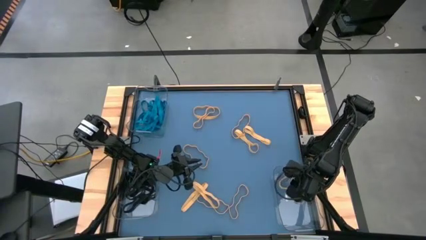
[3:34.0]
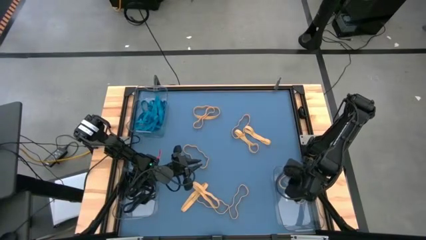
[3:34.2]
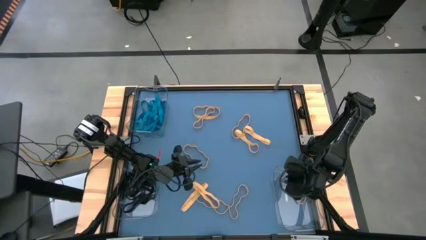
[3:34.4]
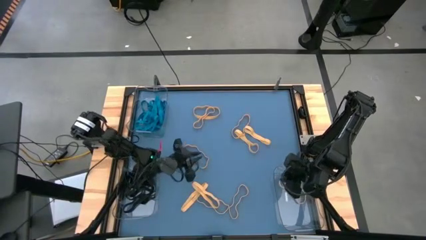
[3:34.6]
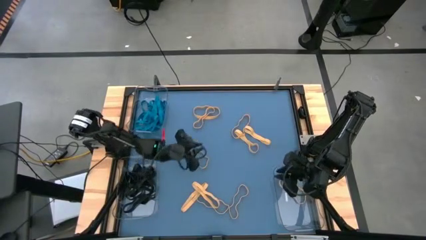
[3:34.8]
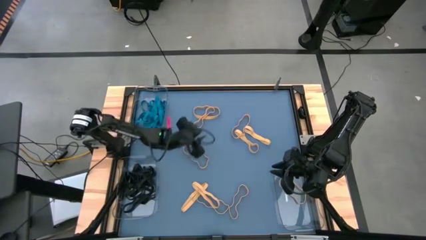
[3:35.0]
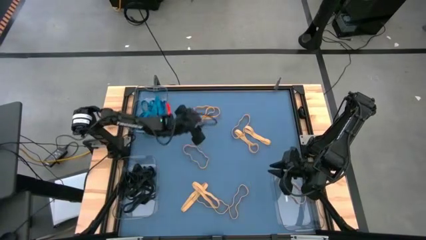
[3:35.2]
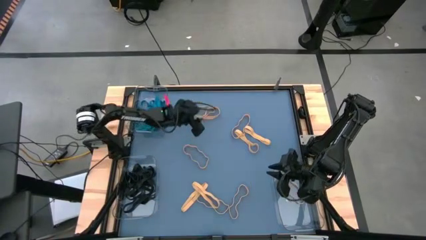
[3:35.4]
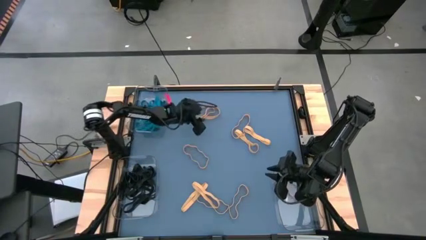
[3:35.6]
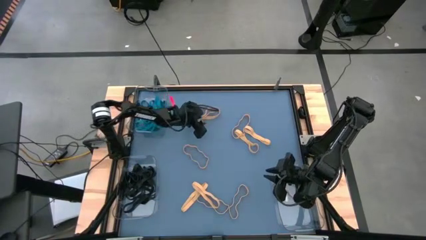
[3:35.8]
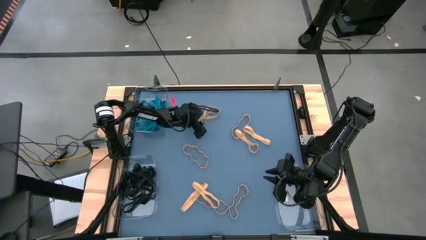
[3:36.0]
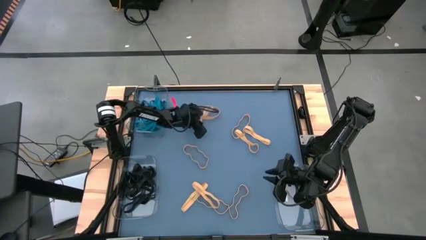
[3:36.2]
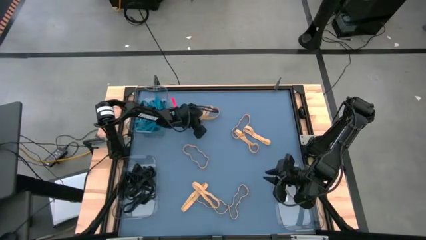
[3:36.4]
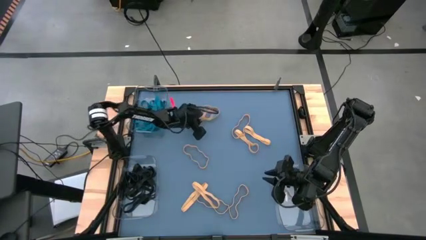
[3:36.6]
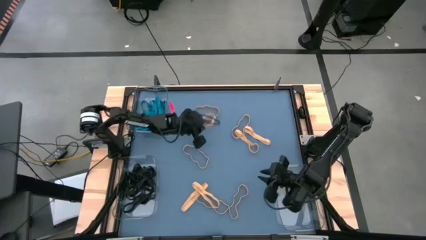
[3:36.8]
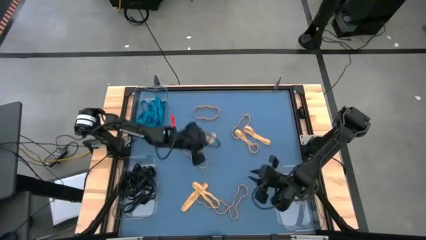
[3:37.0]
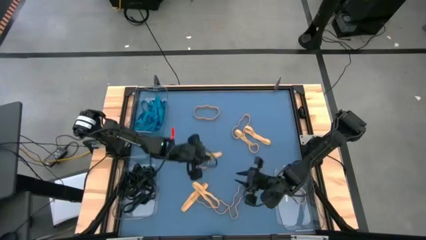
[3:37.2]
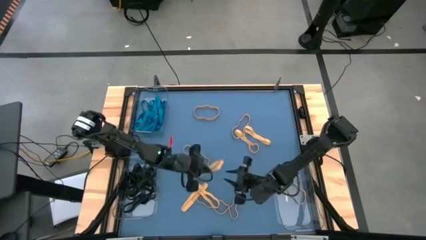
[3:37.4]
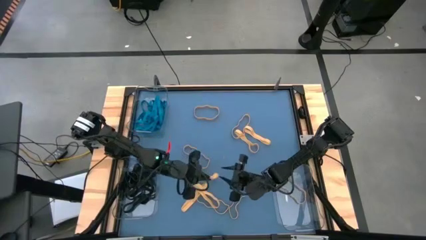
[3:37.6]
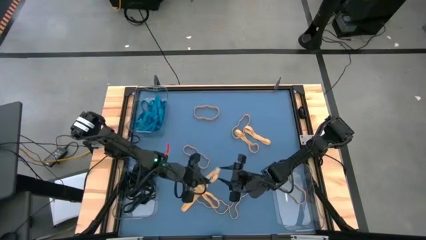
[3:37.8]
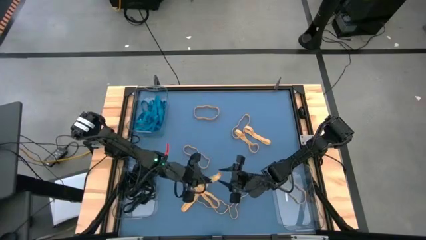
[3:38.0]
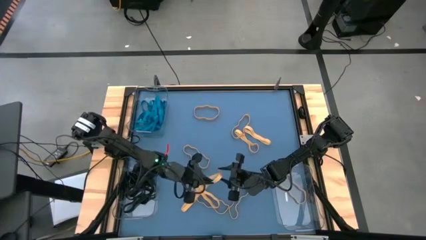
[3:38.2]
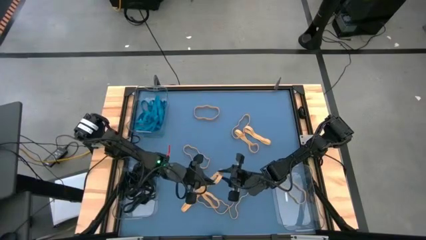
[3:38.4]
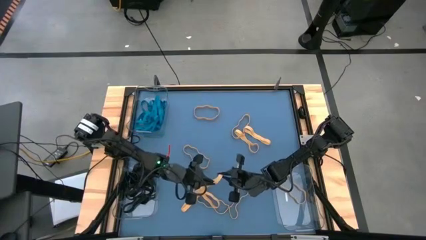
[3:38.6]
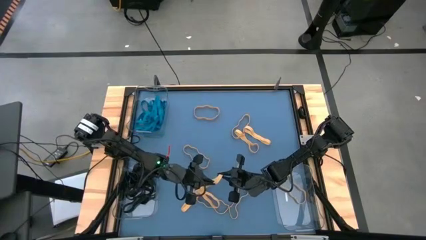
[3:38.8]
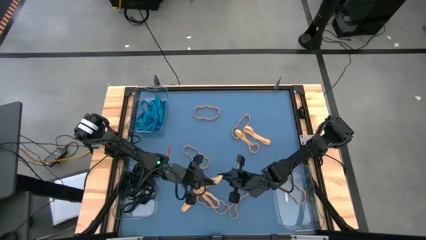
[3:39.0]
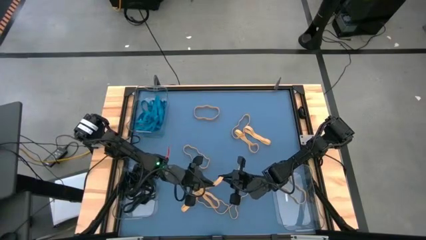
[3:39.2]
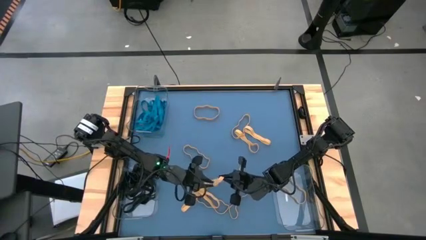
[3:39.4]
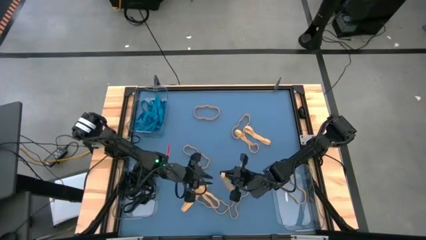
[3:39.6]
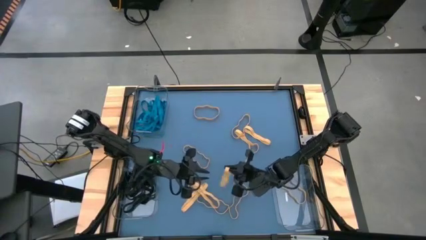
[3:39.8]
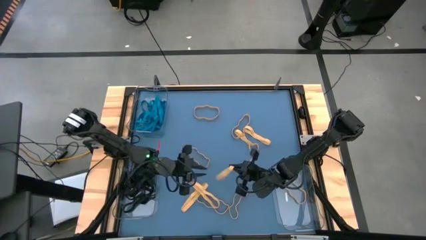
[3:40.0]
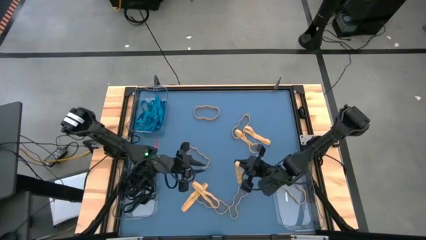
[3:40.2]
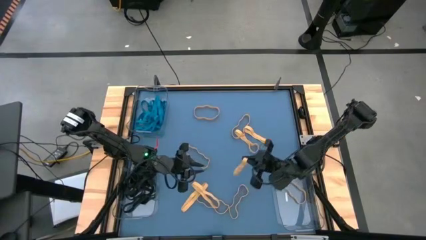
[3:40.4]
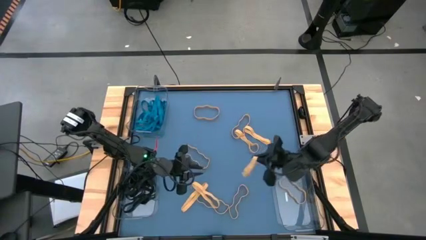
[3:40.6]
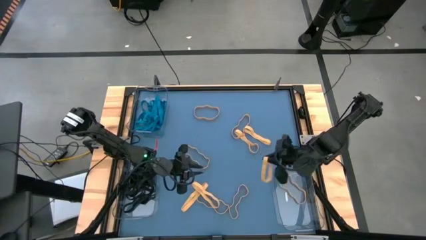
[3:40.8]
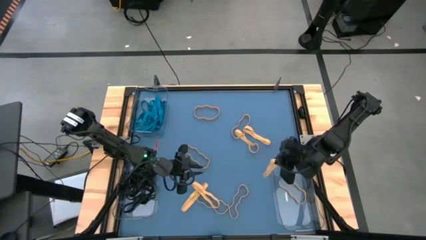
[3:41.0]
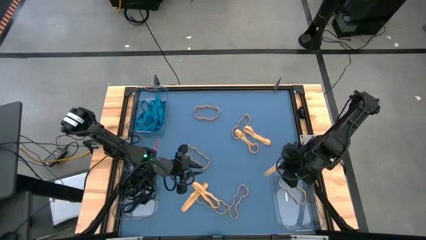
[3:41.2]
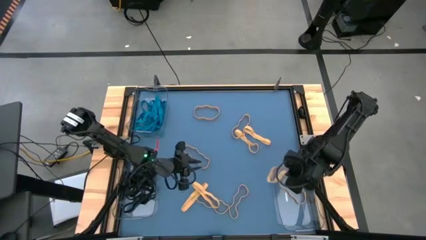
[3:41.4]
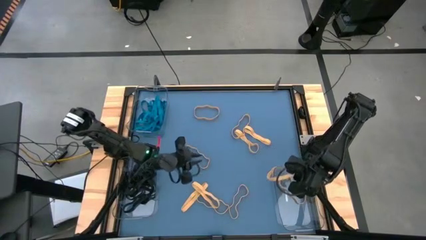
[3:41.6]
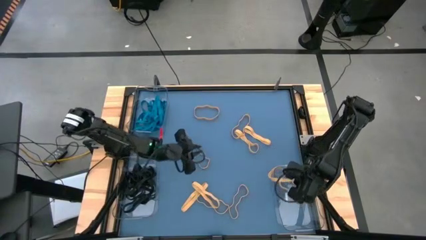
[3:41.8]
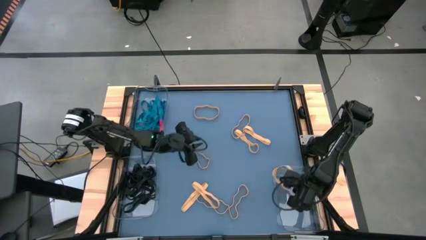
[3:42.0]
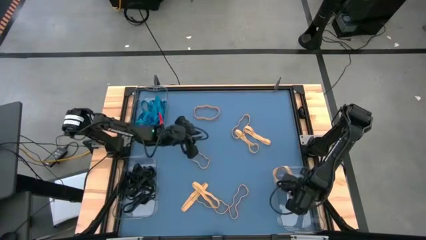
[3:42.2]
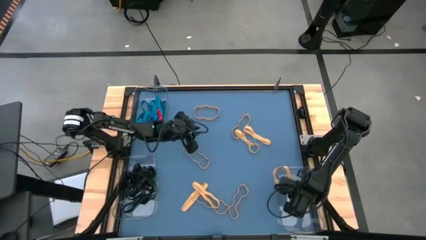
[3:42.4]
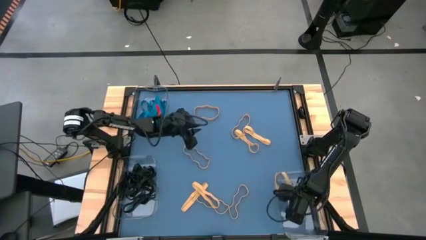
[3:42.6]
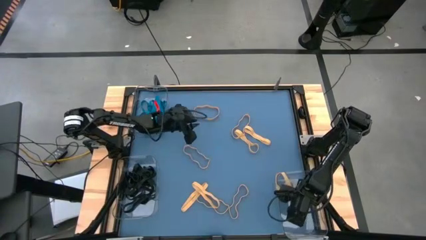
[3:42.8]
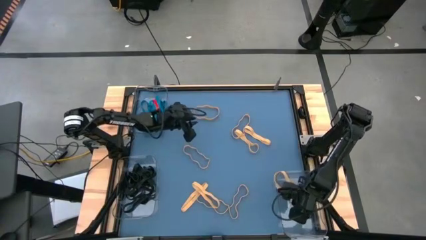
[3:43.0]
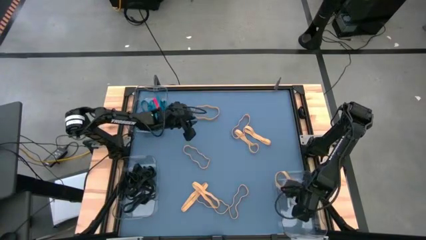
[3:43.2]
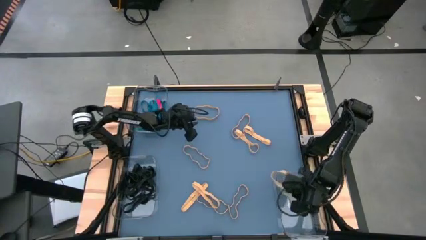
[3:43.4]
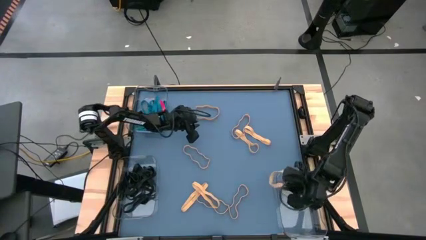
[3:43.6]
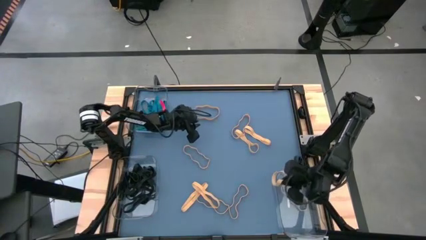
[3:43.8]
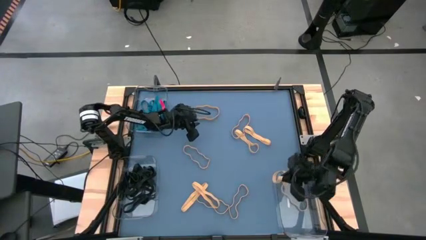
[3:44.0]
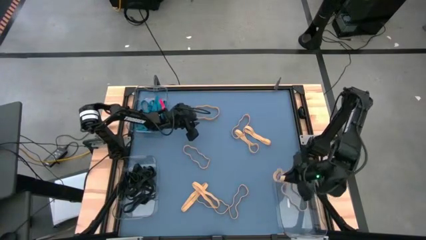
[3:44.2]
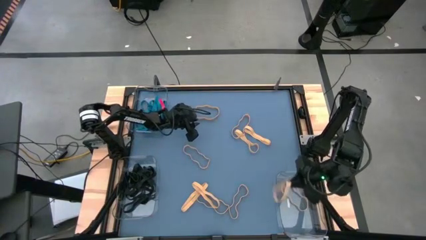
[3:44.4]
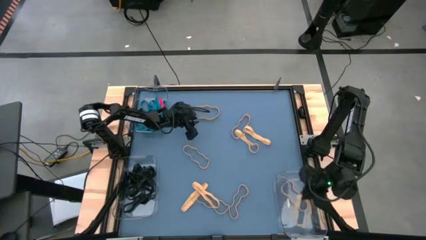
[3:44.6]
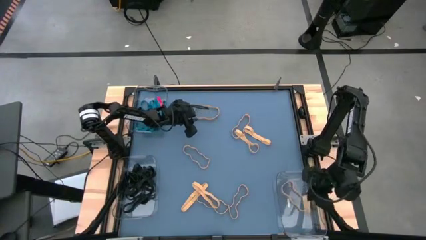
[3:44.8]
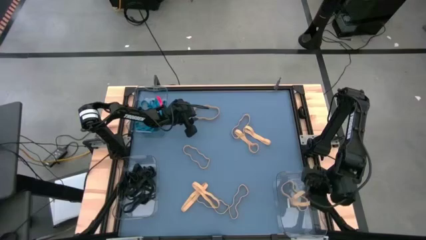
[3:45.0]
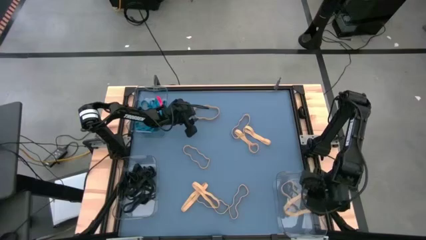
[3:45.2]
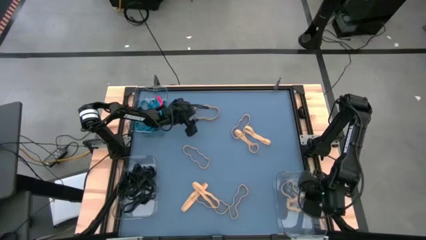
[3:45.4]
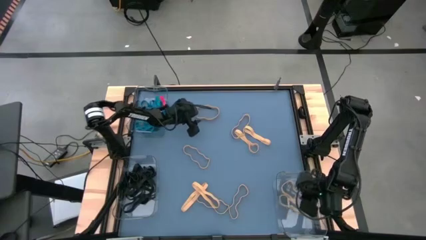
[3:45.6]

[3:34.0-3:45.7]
Task: Sort rubber bands into baskets
Put the yellow rubber band into the bottom right transparent bin

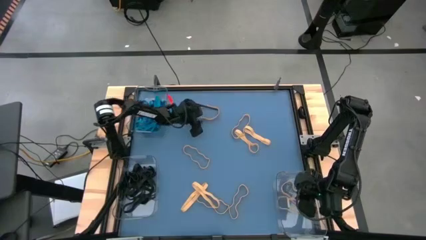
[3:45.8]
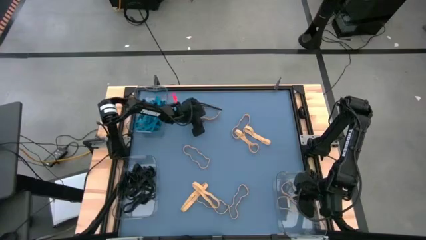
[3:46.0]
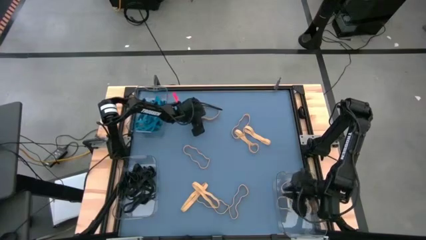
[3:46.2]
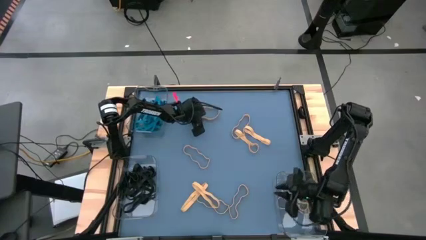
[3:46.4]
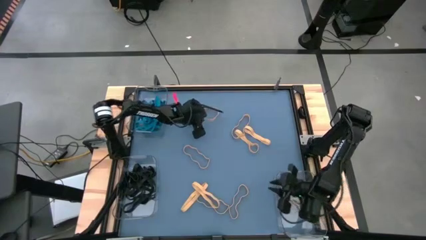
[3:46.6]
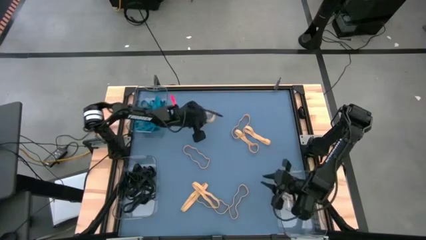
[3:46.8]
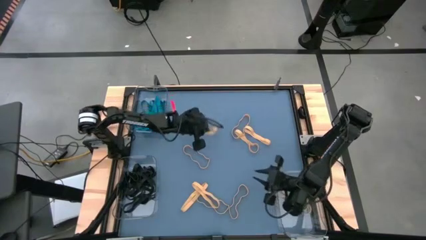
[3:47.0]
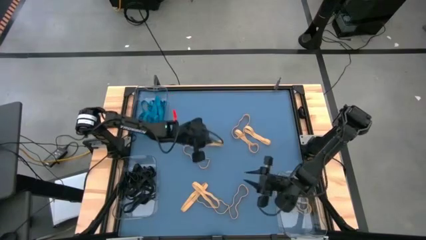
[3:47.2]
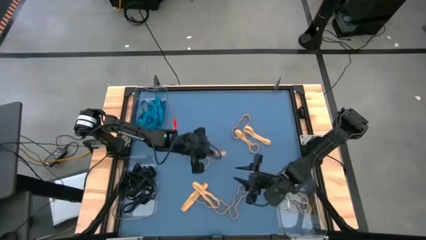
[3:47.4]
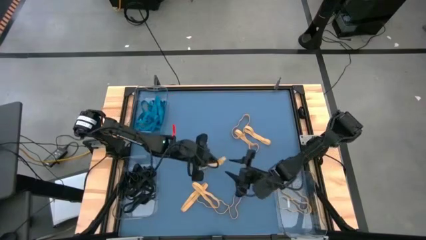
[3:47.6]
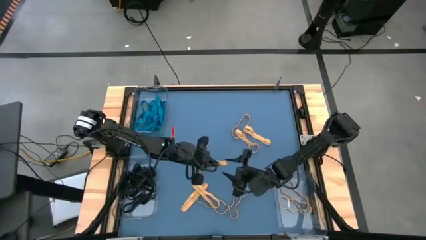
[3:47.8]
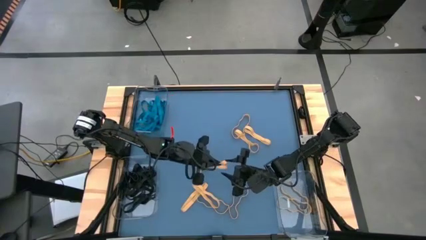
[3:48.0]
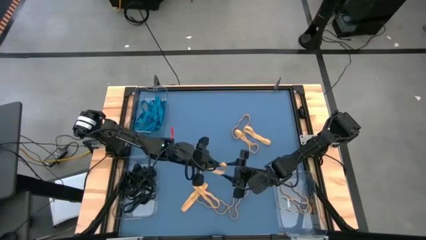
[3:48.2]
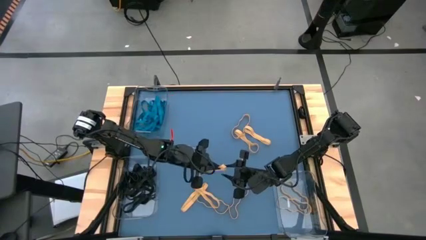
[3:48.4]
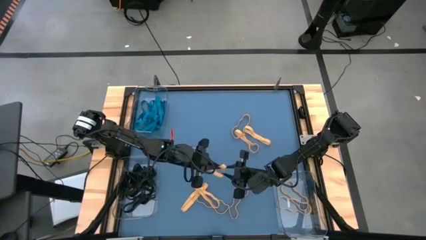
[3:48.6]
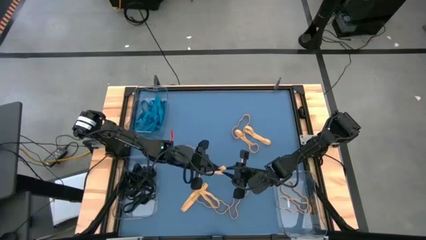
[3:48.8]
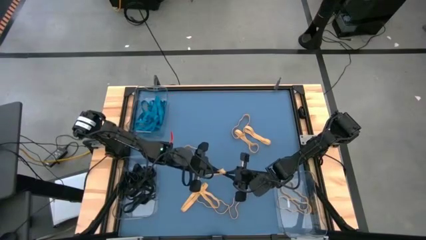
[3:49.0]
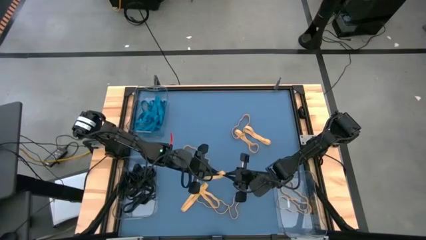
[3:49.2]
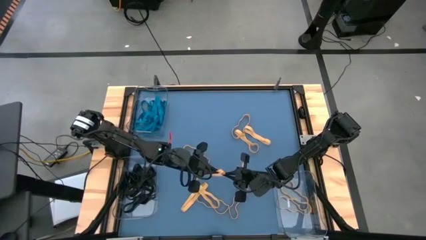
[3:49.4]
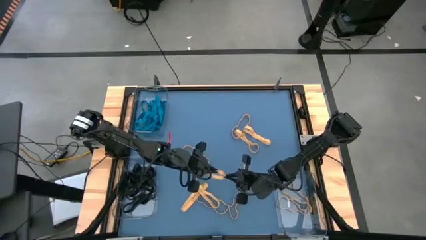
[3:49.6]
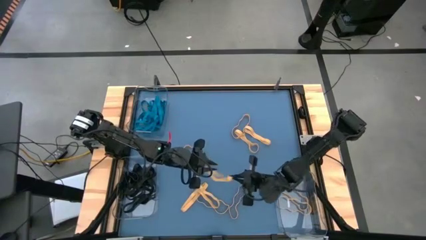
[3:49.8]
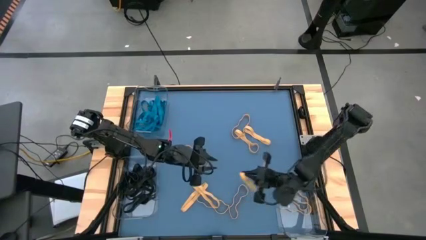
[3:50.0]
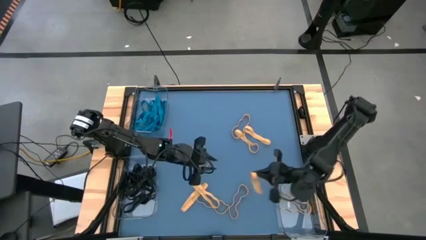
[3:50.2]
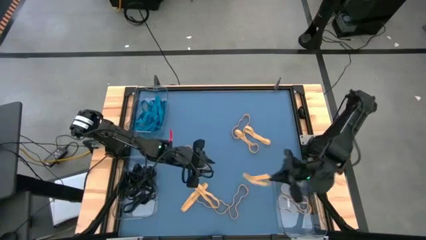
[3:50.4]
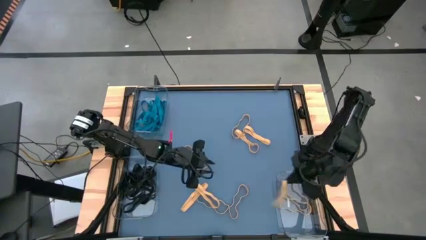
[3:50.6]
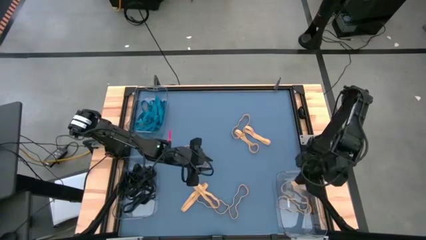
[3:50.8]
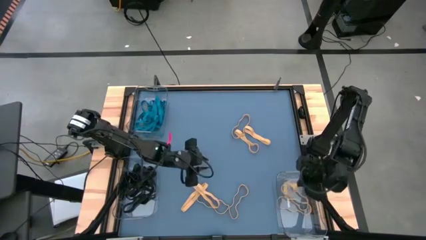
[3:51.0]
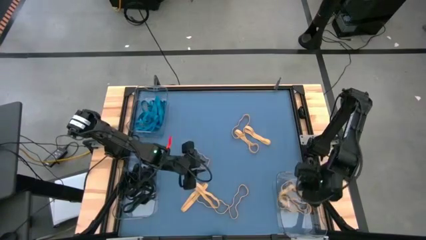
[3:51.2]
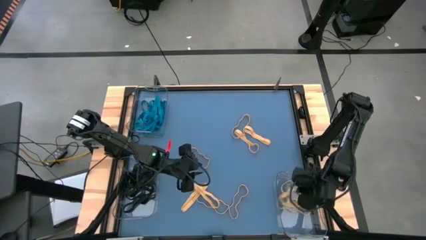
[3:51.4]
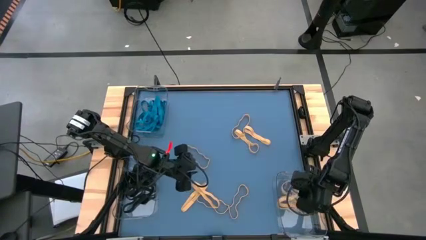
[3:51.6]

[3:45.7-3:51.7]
Put the yellow rubber band into the bottom right transparent bin
